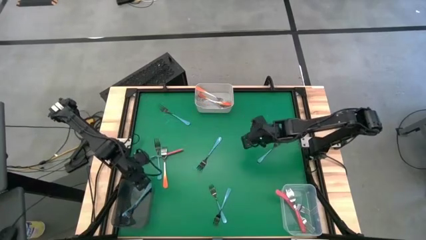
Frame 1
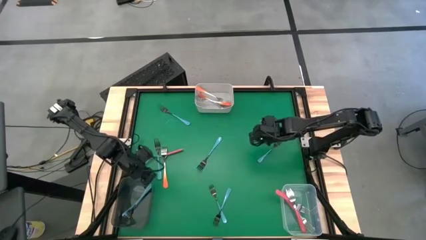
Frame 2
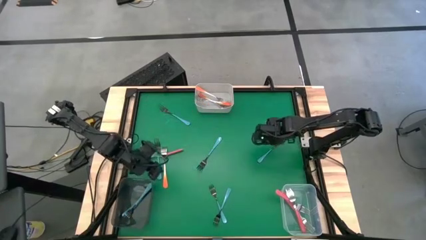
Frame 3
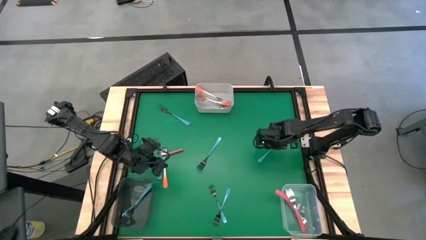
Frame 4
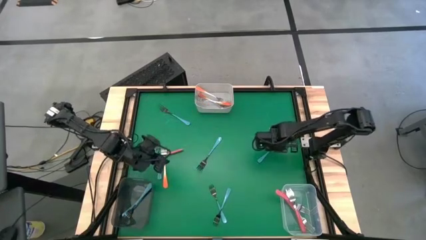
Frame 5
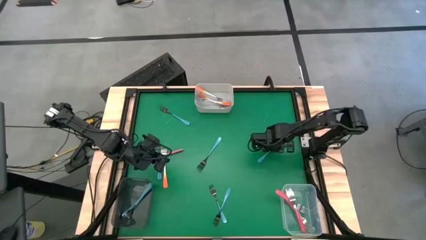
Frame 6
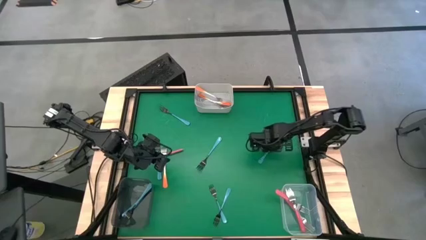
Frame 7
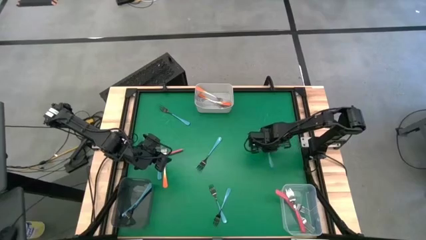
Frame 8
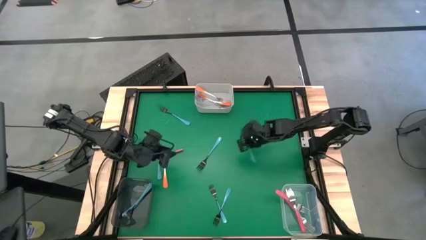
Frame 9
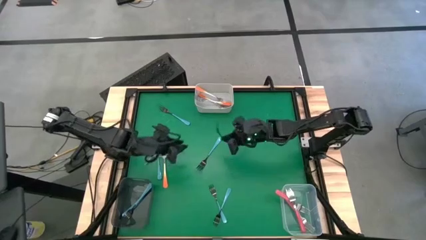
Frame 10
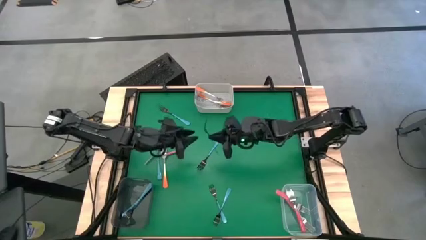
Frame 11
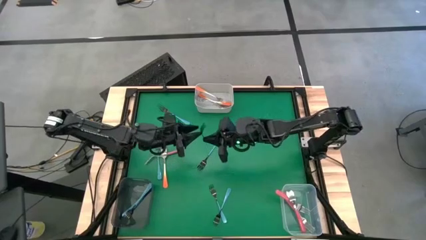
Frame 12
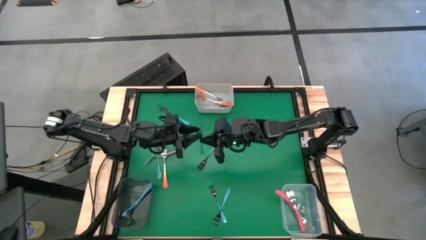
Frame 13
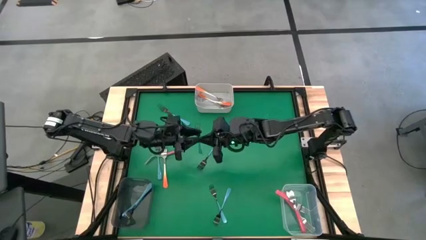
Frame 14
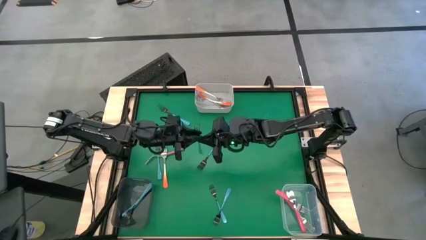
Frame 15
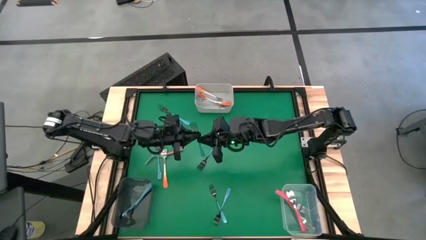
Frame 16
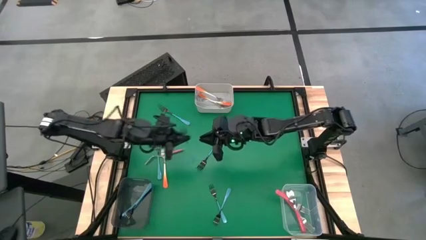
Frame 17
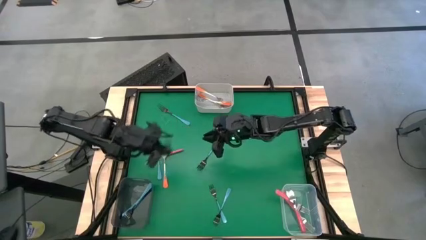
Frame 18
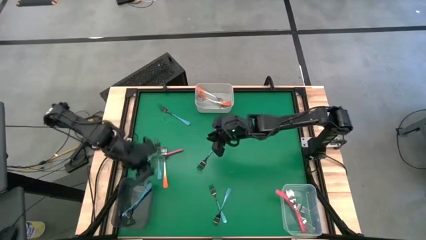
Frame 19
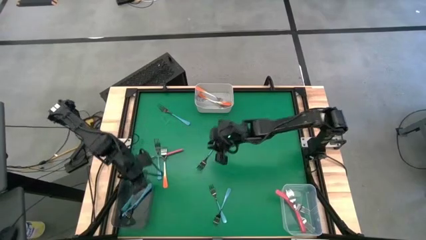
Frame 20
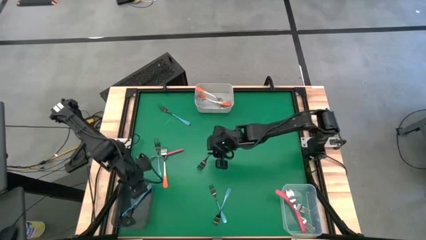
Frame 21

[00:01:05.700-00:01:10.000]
Task: Sort silverware by color (type)
Put the blue fork into the black transparent bin

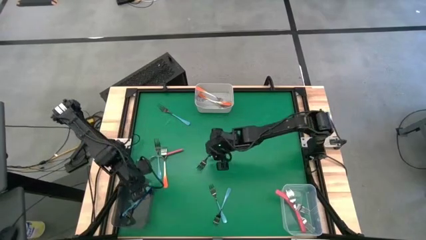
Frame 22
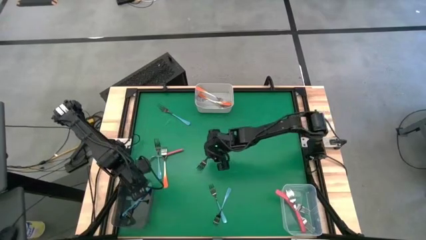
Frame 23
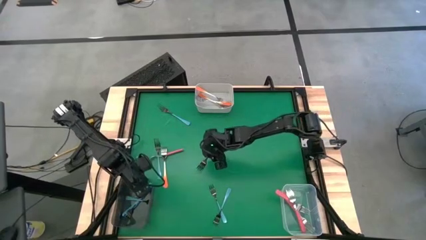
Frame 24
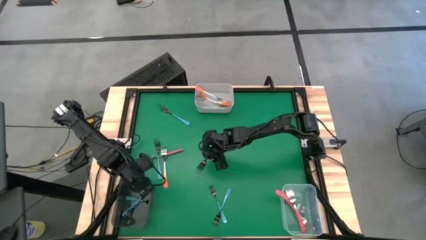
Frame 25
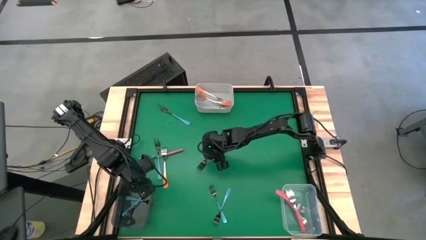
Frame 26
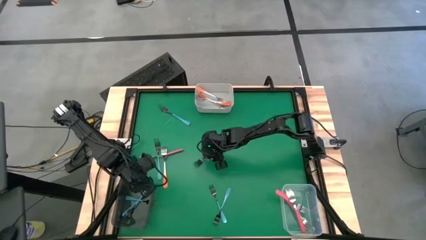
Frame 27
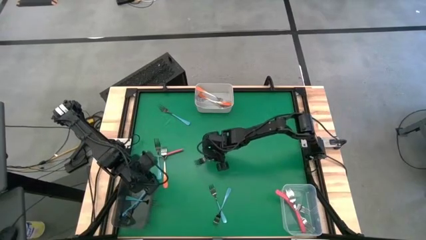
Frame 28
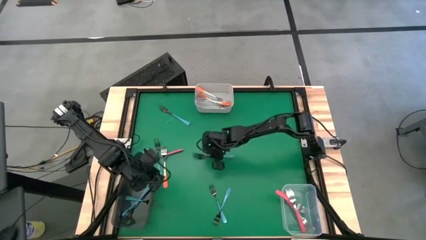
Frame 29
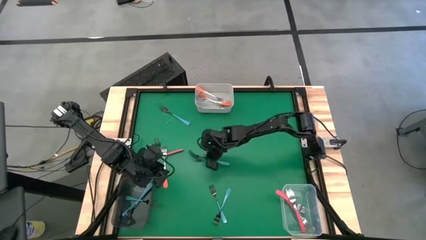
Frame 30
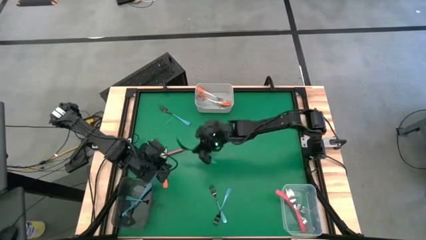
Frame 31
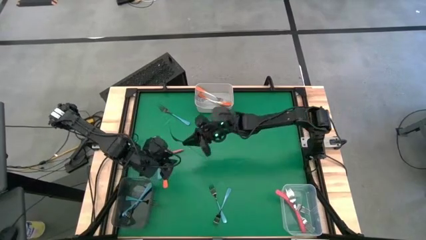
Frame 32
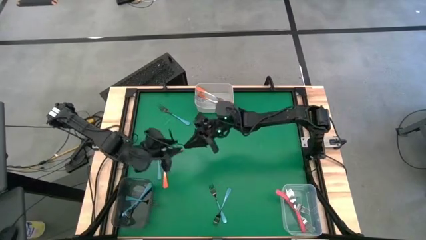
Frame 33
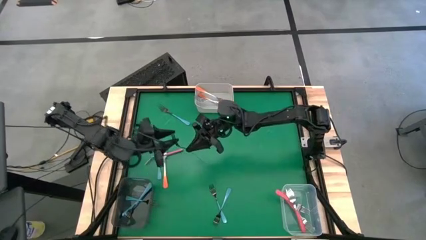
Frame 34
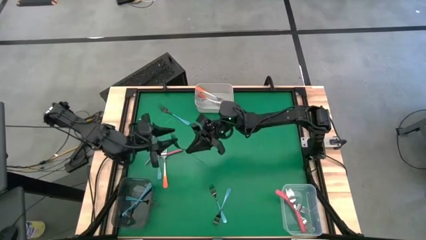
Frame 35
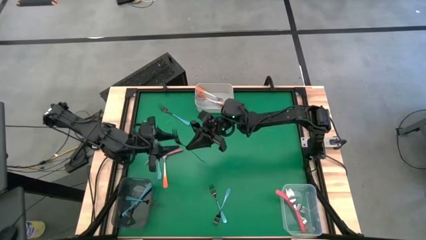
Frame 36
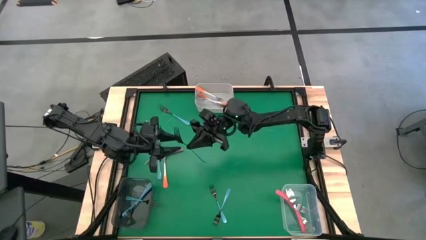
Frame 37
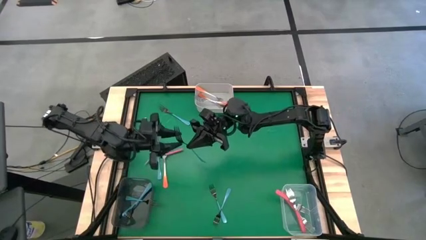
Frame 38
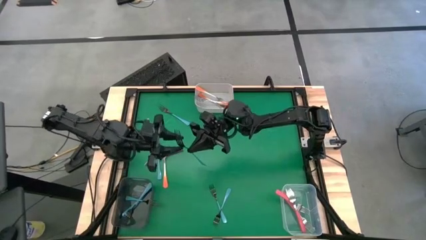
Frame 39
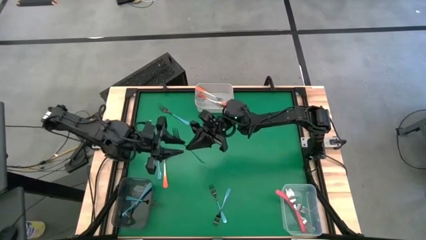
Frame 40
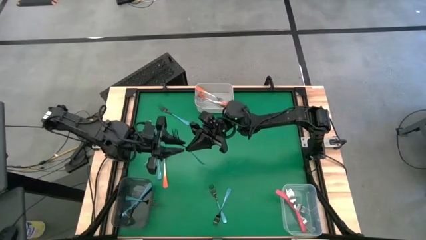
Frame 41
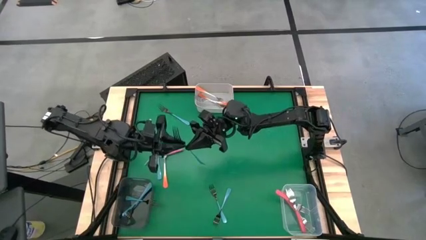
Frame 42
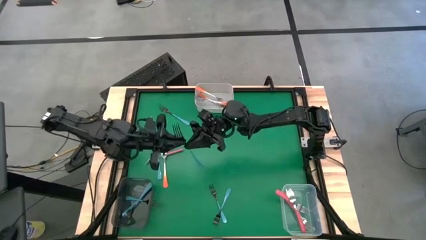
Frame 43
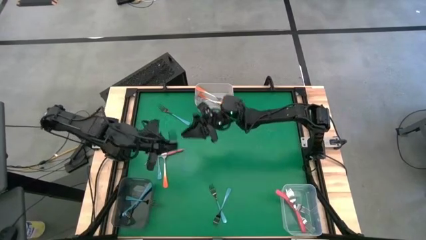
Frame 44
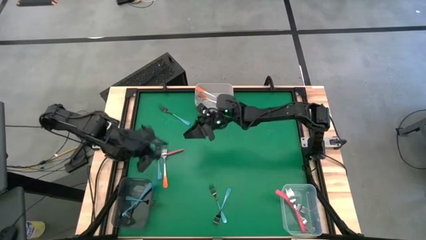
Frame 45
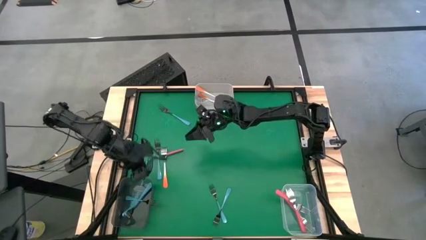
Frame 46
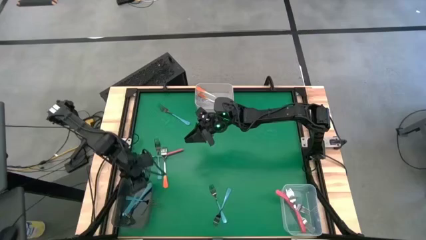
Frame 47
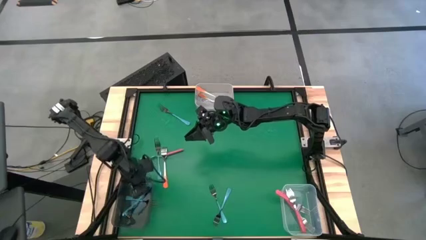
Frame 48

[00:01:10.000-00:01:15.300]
Put the blue fork into the black transparent bin

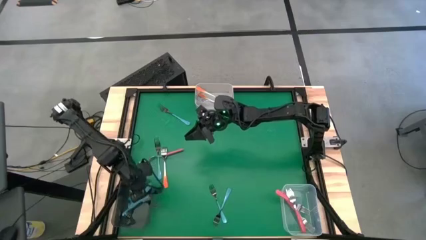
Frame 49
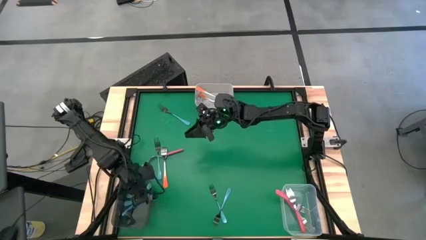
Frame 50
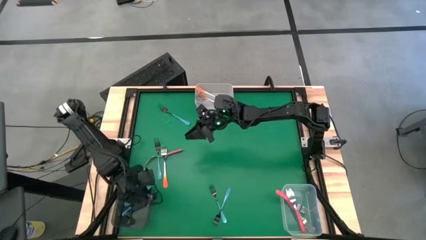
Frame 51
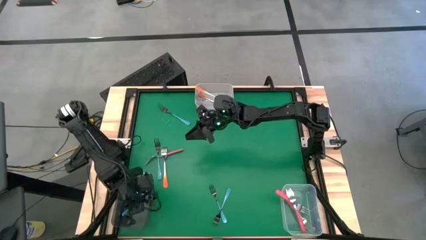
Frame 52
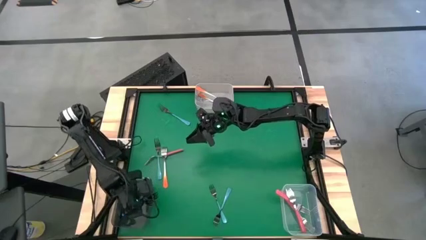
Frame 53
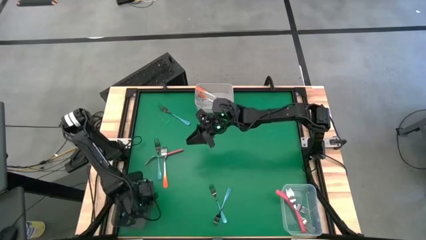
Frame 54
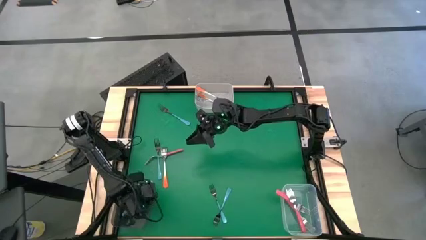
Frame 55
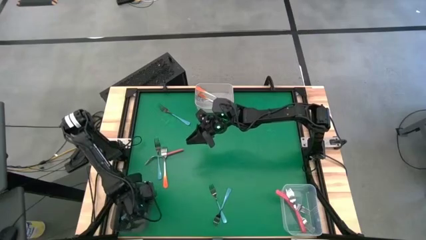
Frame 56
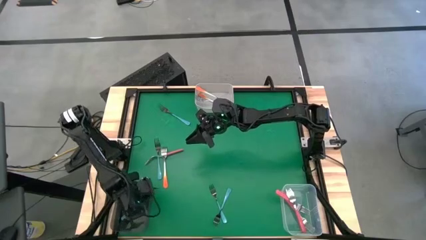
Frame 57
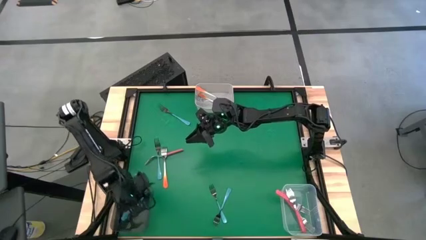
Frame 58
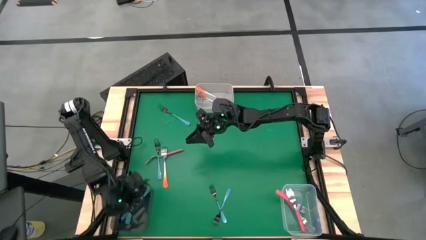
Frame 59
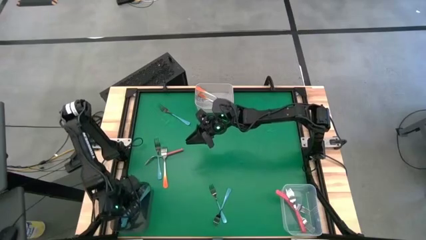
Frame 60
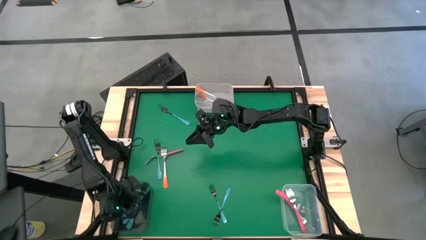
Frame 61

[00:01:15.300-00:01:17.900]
Adjust the blue forks
